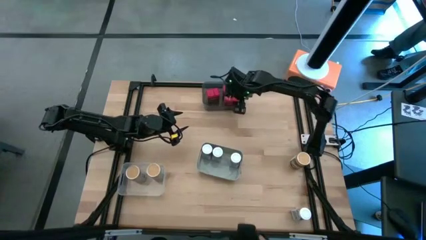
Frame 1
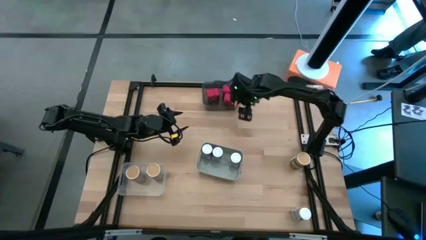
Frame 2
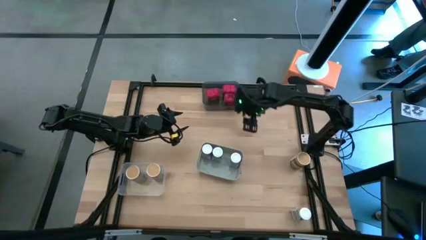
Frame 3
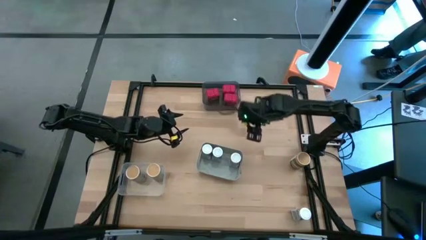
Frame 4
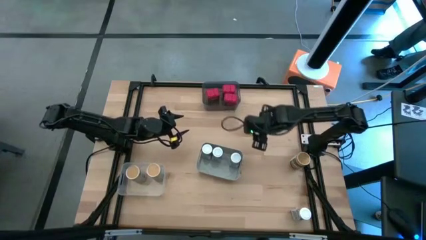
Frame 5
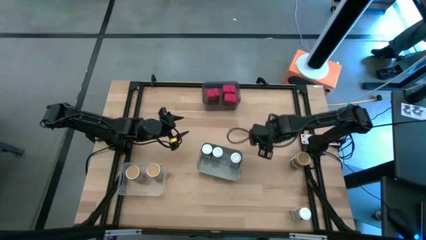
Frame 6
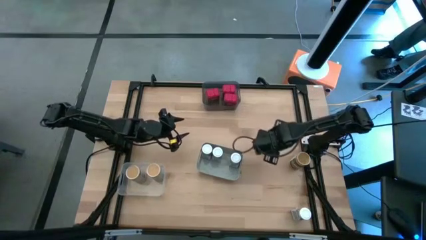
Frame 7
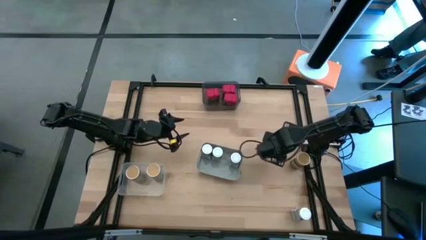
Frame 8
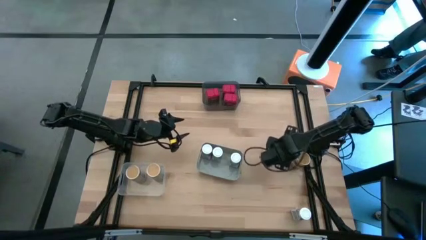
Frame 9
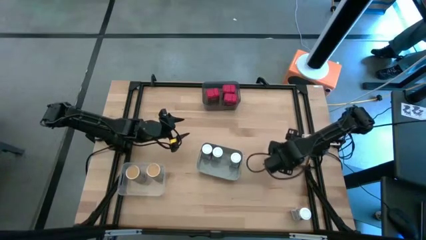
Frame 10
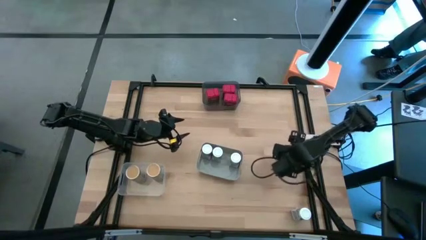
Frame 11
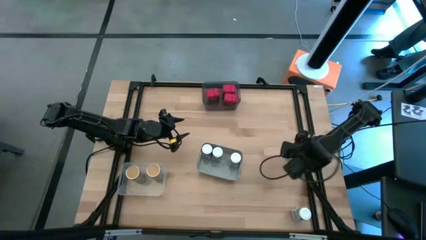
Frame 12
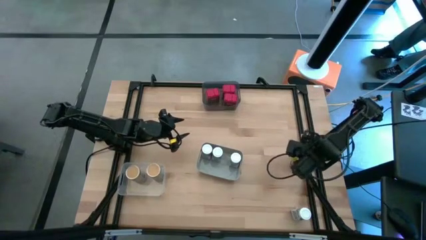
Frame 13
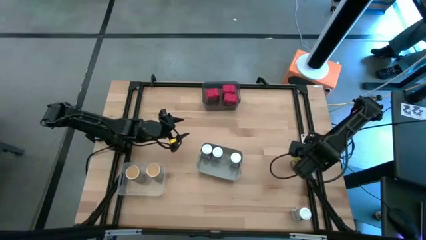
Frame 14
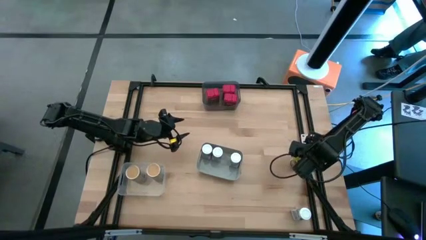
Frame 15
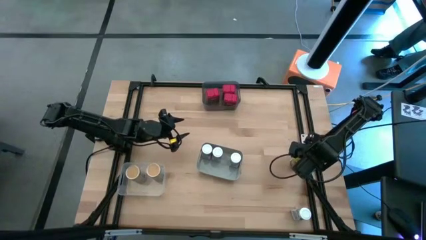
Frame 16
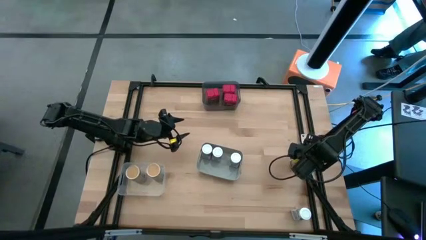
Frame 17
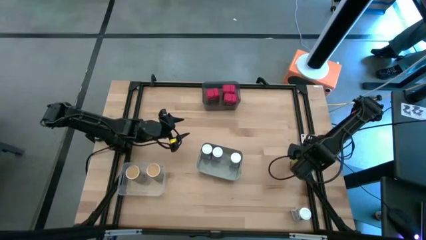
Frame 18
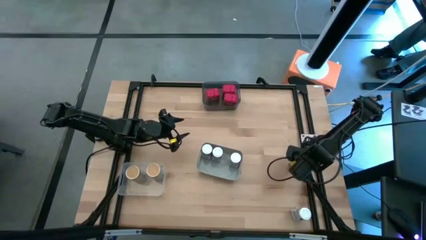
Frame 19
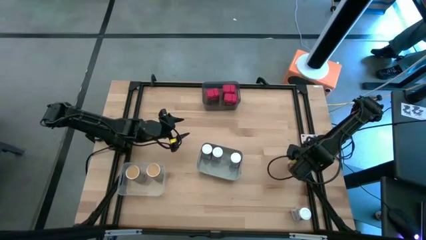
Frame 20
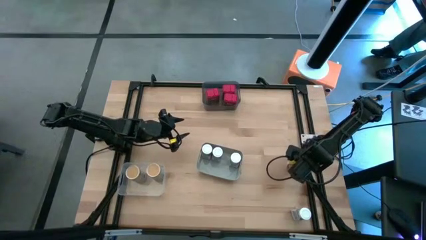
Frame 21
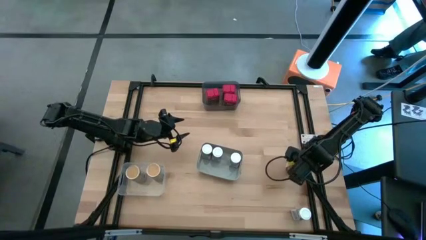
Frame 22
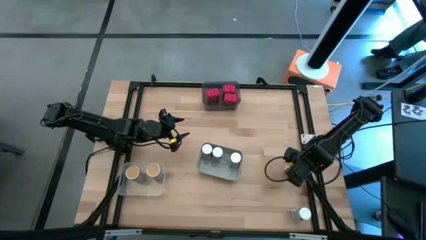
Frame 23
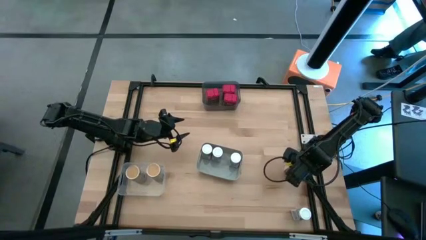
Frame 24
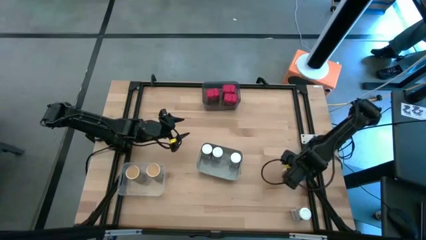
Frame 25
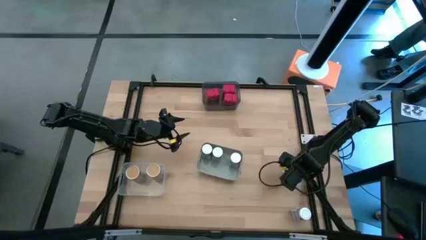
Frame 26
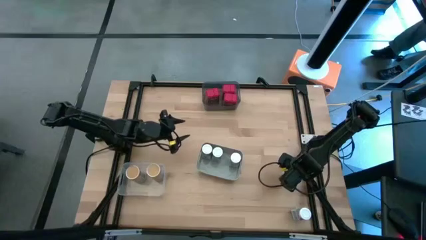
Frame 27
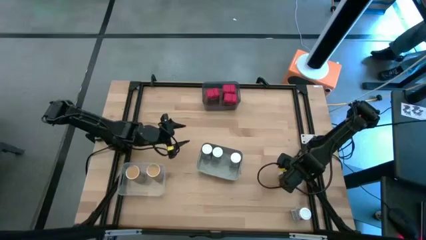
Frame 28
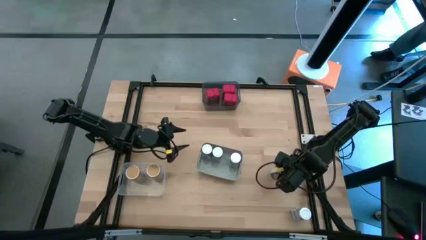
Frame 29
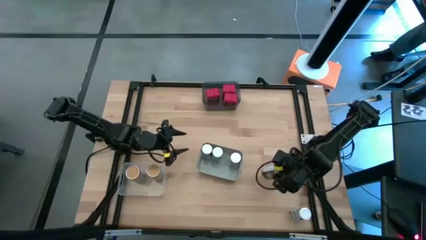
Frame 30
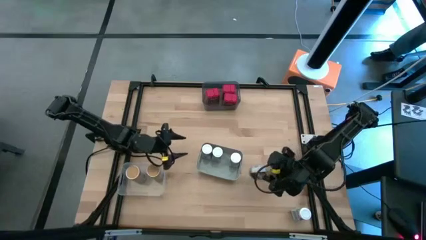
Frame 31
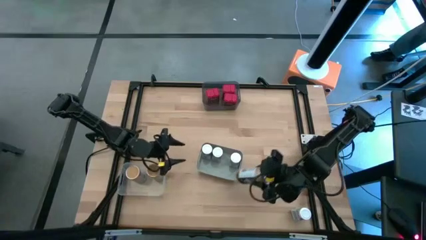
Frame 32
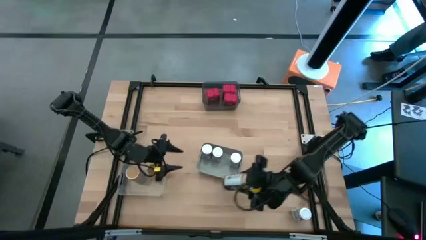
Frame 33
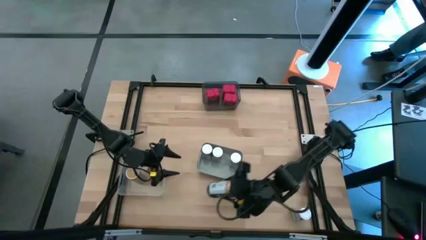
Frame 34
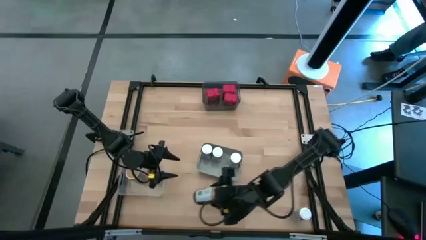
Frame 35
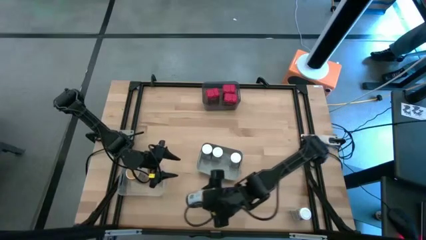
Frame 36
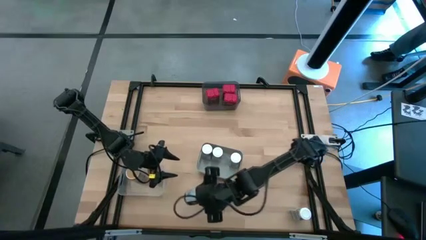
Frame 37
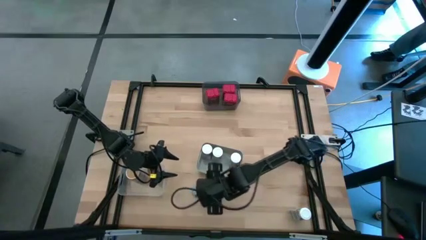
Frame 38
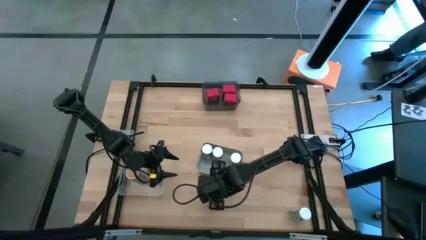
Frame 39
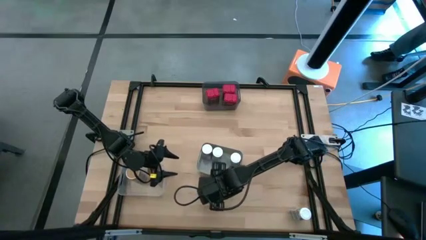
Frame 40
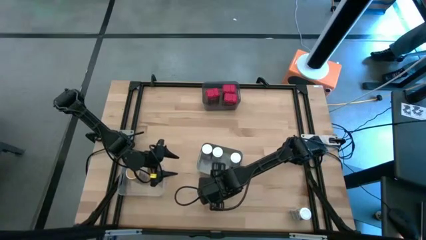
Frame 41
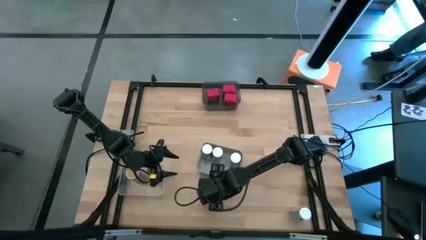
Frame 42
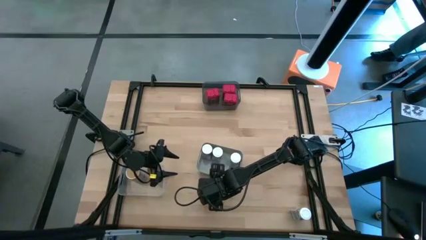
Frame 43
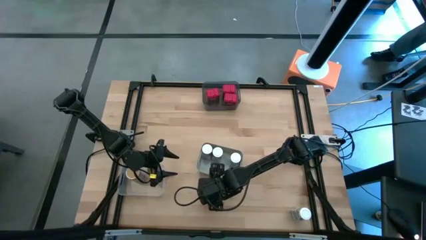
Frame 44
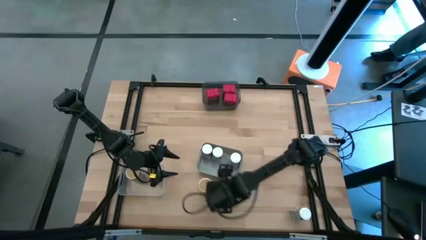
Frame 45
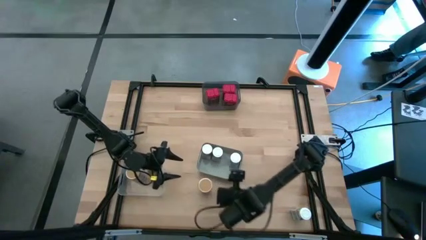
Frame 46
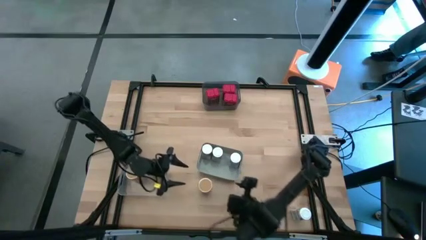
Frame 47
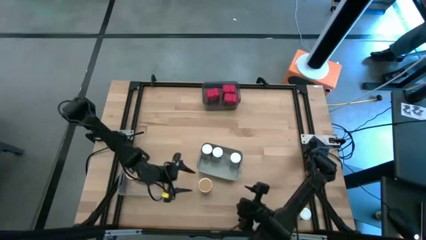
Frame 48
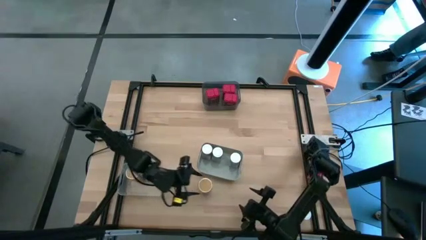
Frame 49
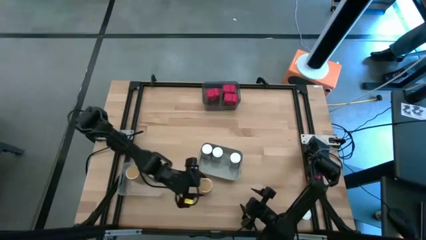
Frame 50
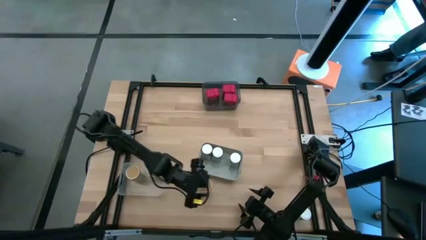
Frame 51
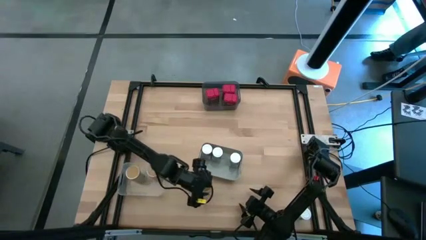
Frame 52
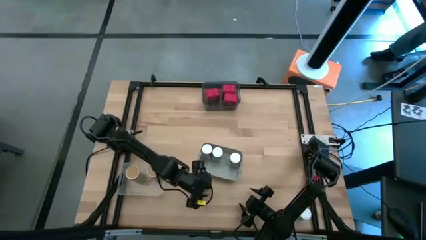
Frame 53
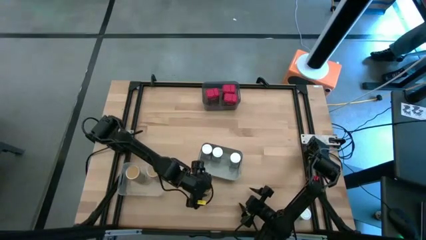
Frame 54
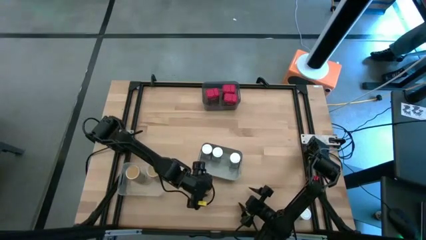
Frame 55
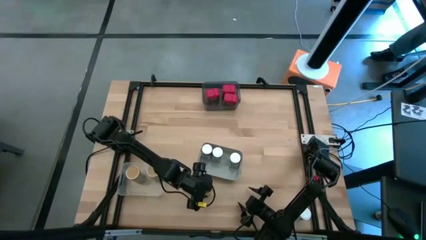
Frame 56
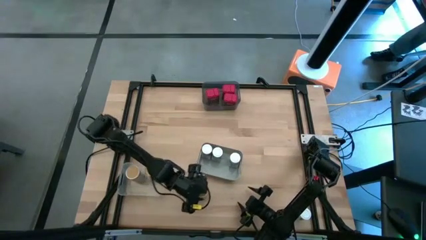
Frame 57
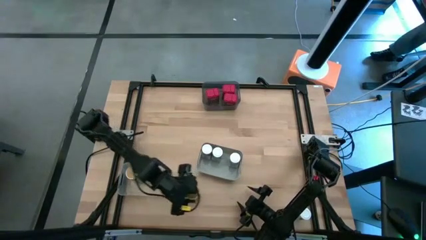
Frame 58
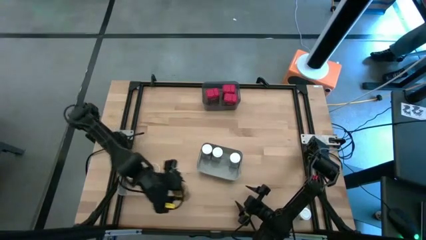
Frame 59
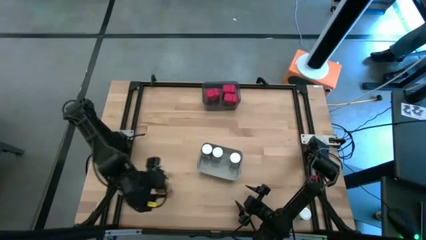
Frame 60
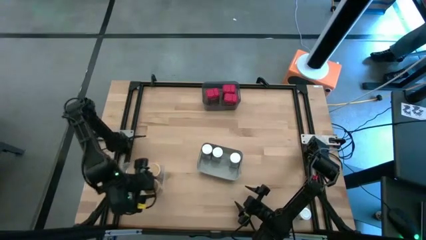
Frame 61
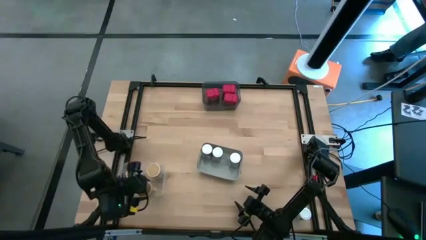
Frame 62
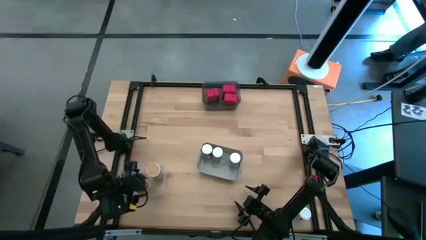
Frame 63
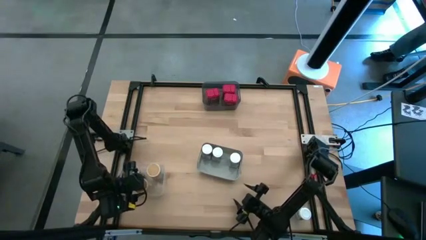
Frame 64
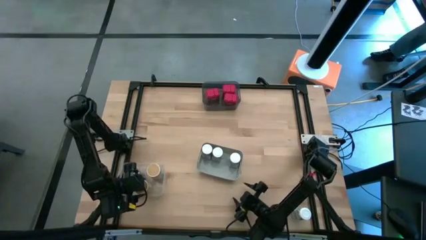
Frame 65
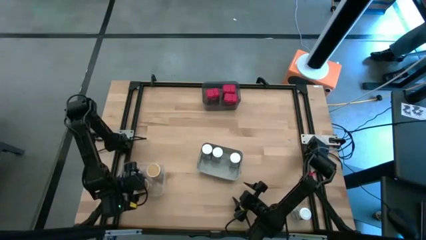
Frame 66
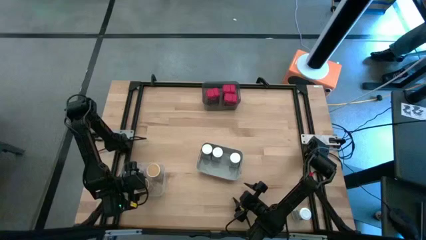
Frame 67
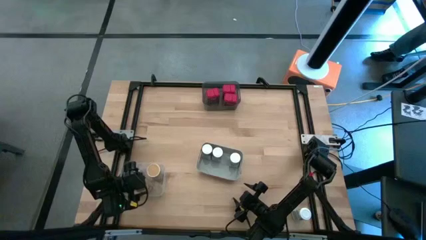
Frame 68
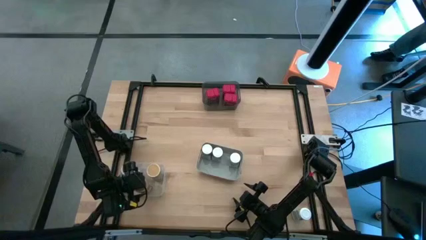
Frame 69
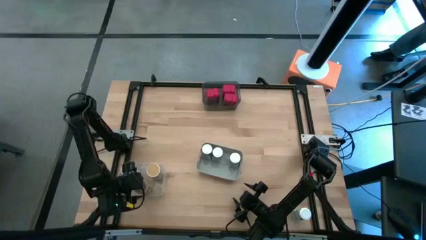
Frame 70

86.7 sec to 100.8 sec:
Task: Sort spices by type
Put the brown seasoning bottle into the transparent bin
